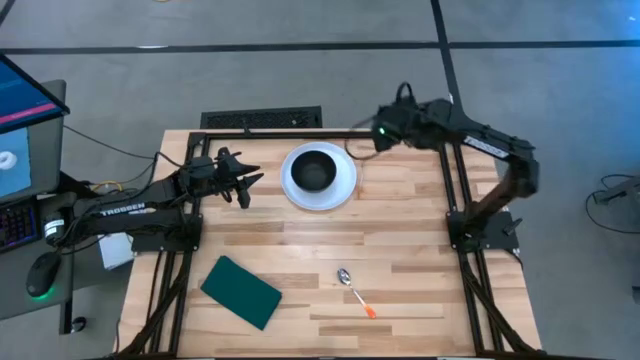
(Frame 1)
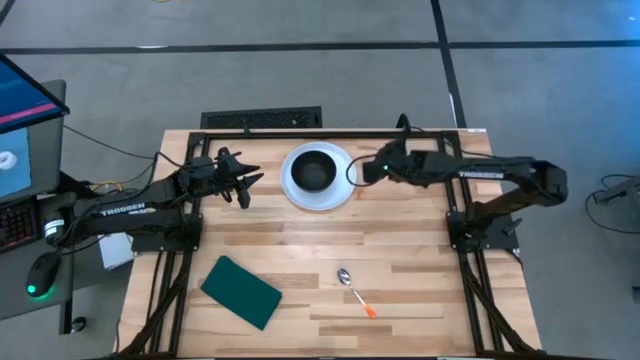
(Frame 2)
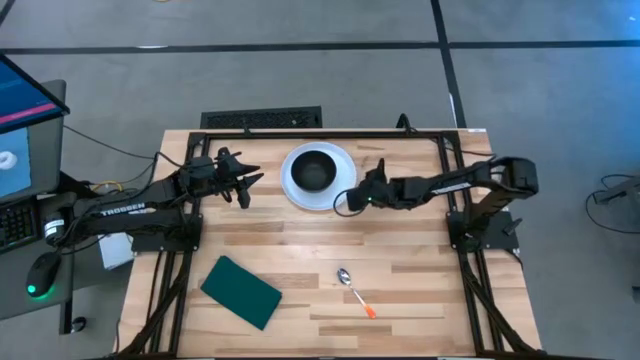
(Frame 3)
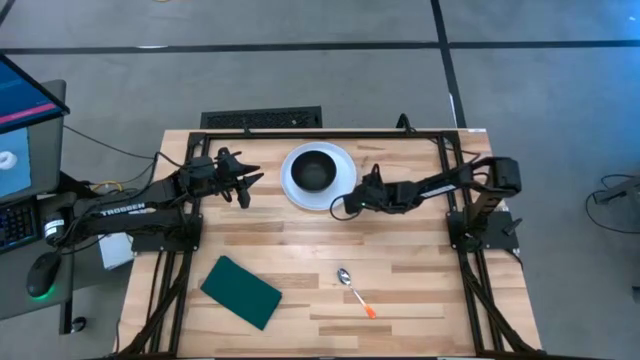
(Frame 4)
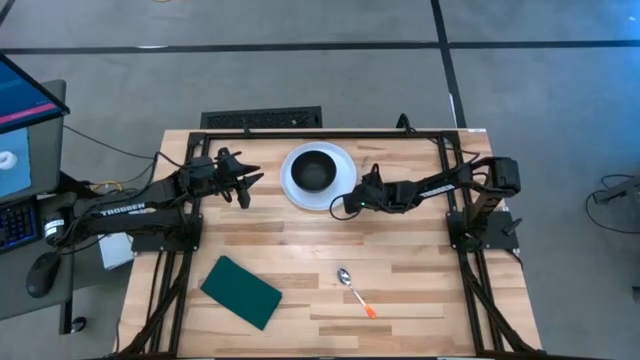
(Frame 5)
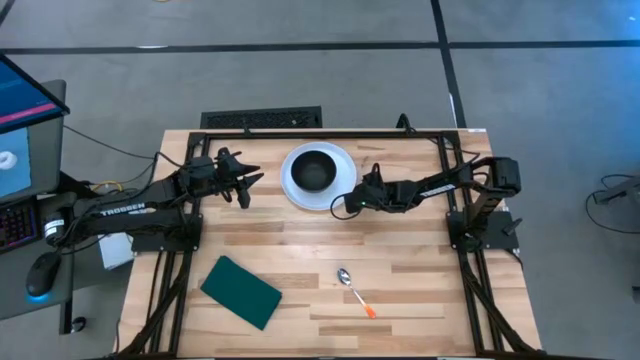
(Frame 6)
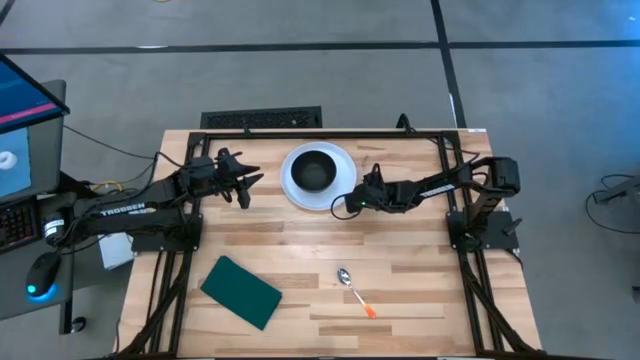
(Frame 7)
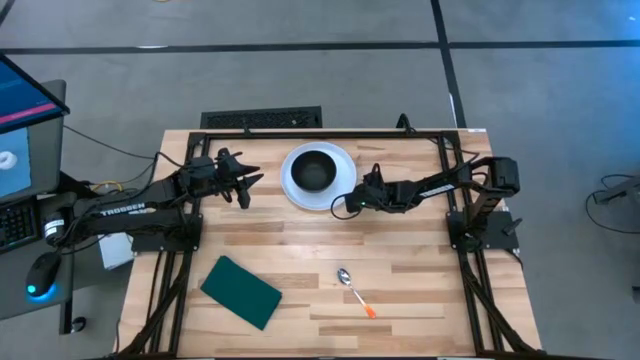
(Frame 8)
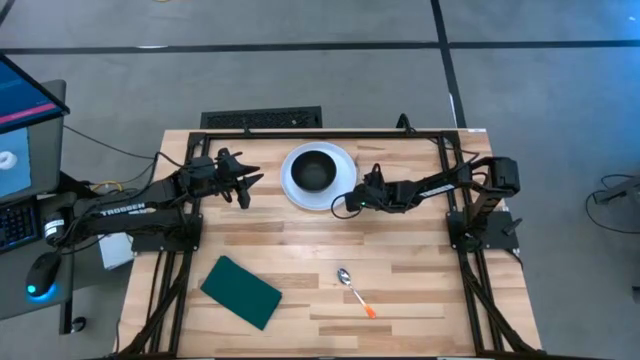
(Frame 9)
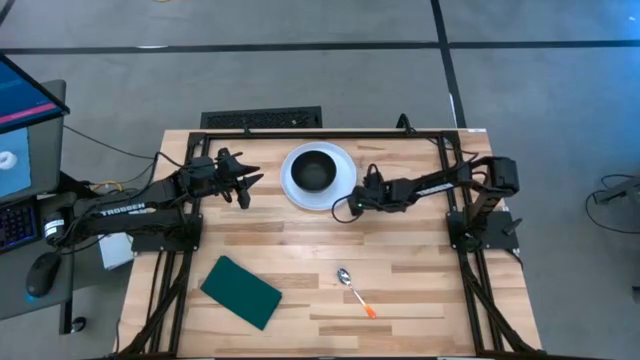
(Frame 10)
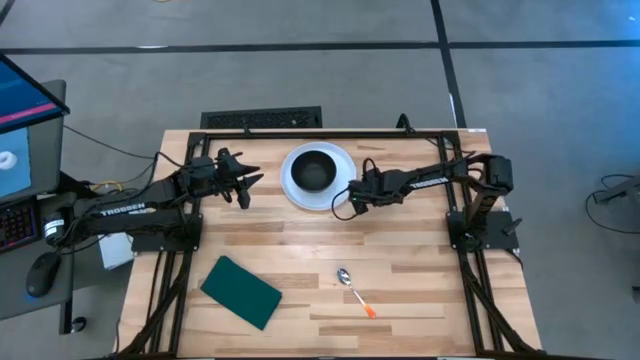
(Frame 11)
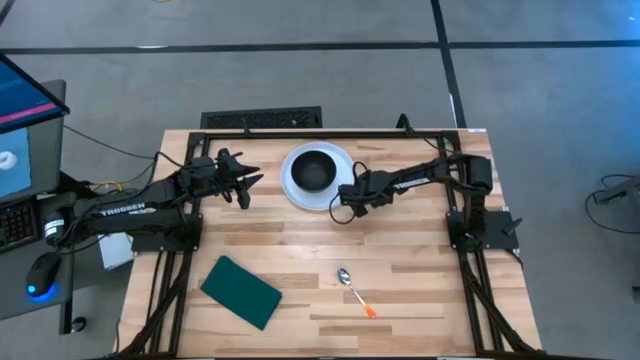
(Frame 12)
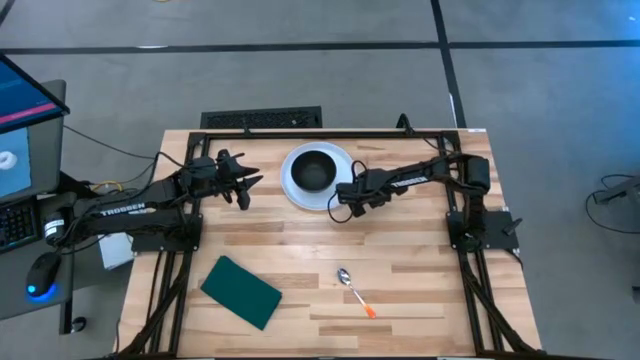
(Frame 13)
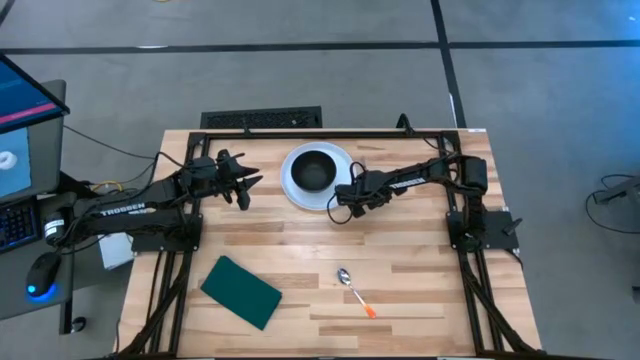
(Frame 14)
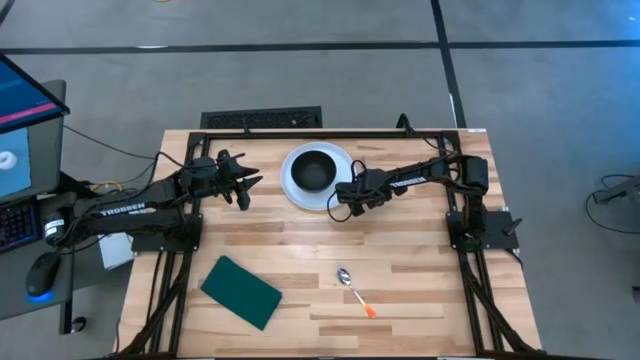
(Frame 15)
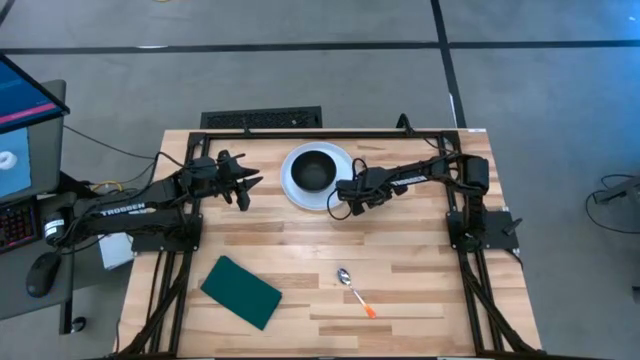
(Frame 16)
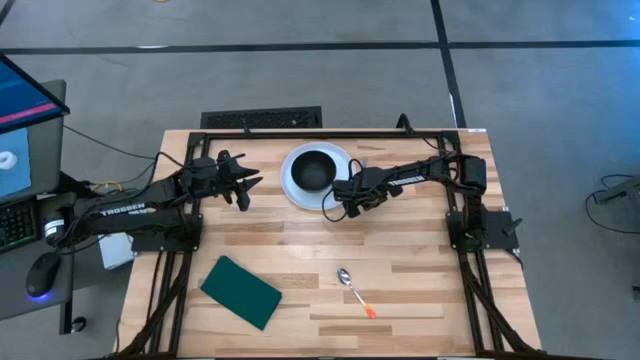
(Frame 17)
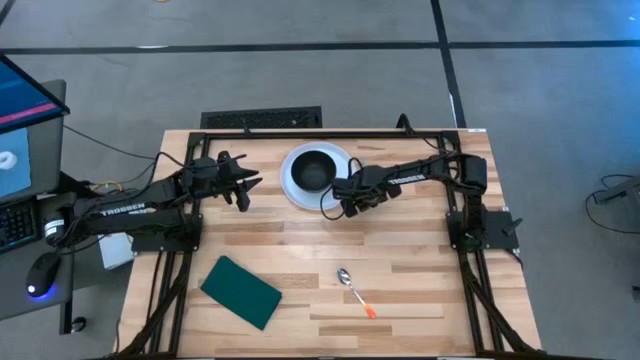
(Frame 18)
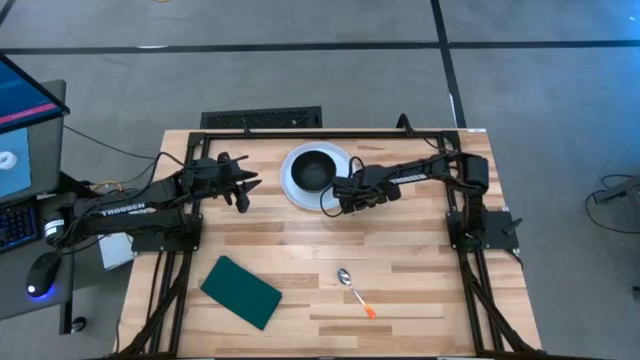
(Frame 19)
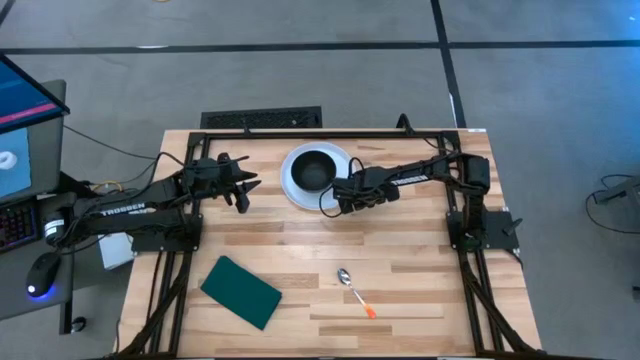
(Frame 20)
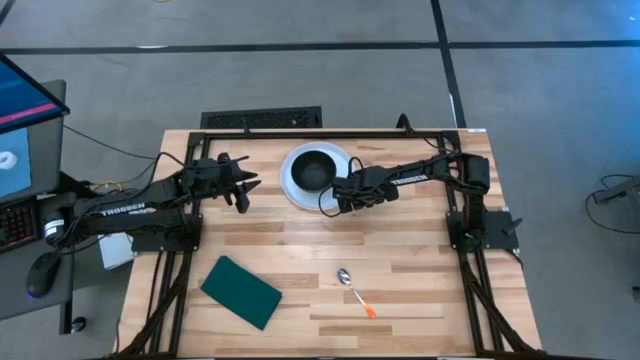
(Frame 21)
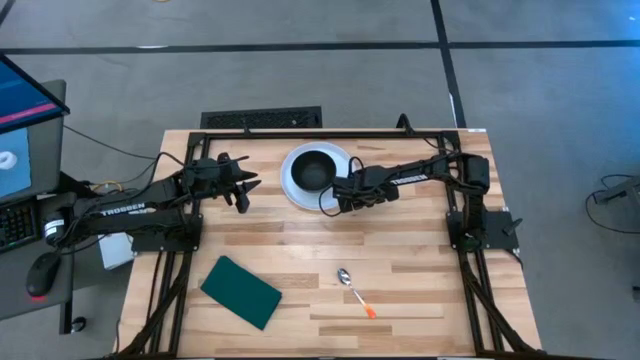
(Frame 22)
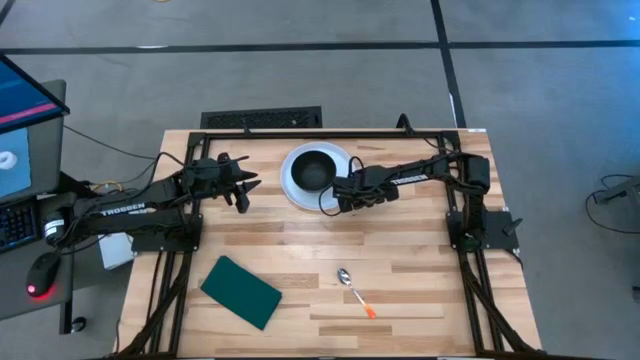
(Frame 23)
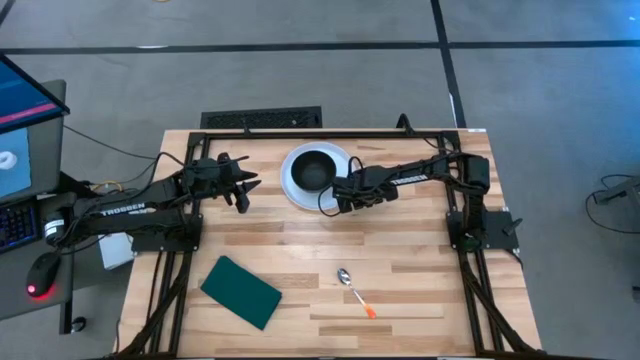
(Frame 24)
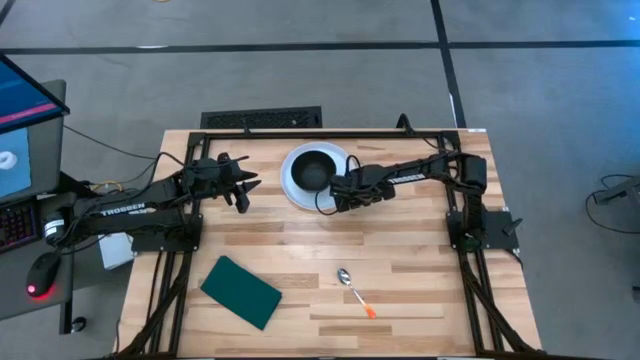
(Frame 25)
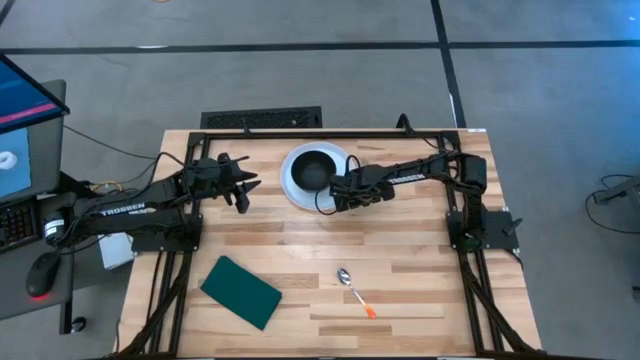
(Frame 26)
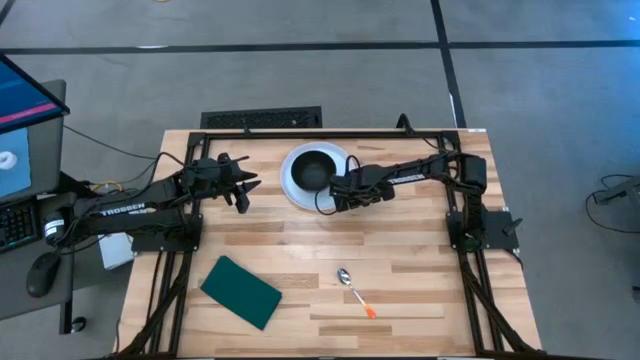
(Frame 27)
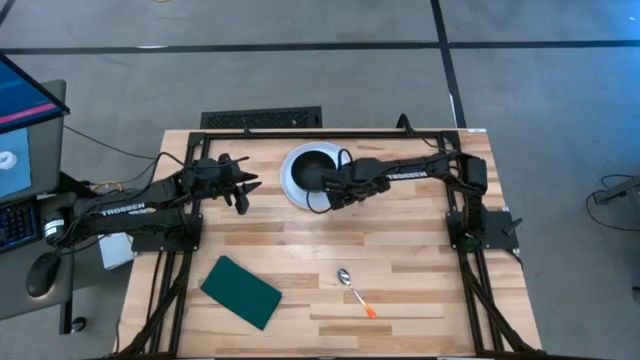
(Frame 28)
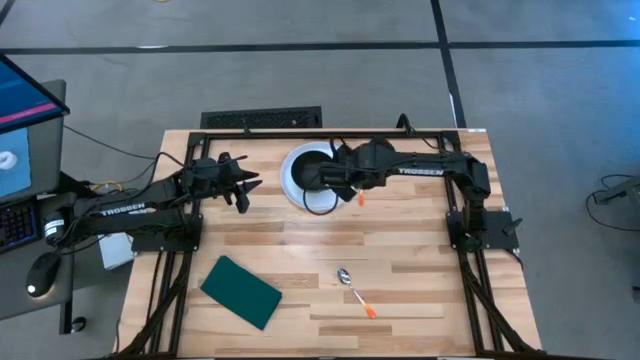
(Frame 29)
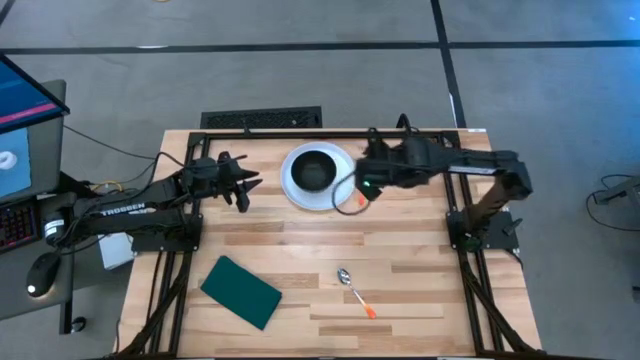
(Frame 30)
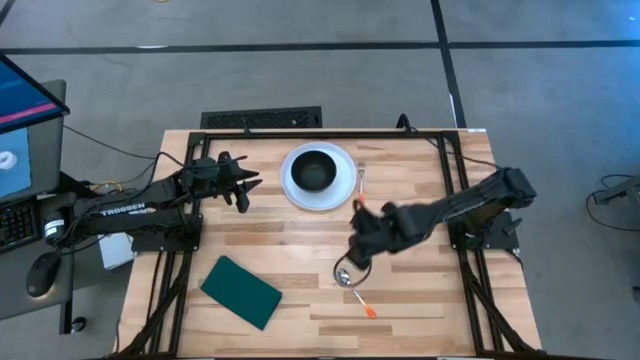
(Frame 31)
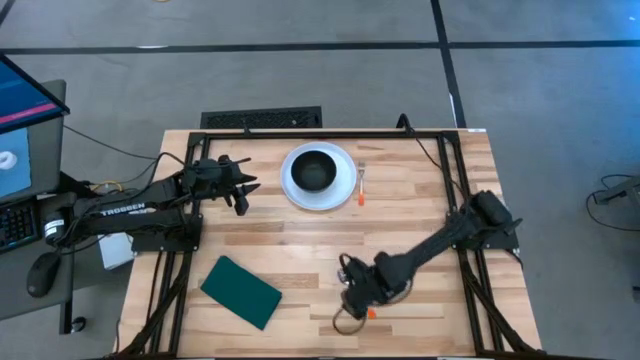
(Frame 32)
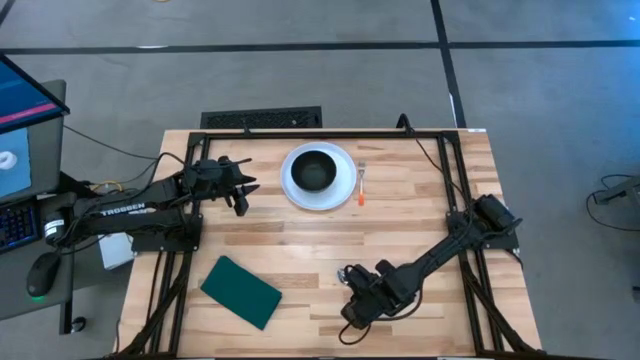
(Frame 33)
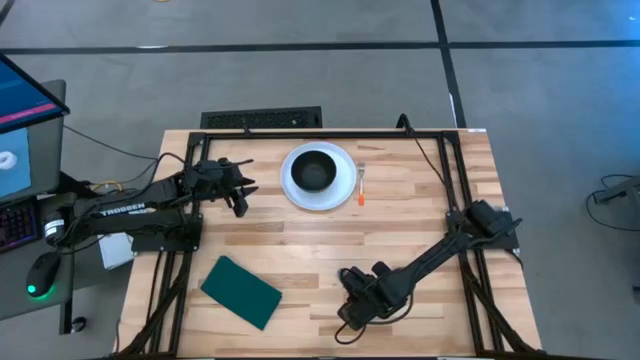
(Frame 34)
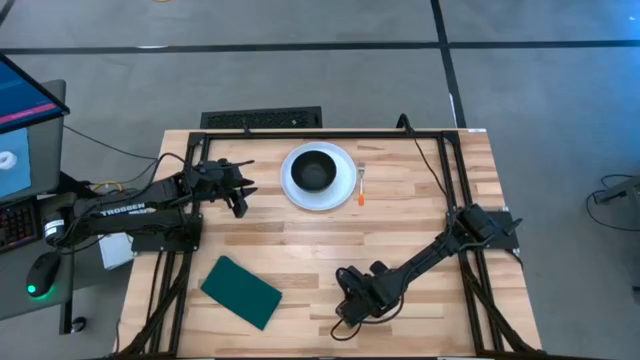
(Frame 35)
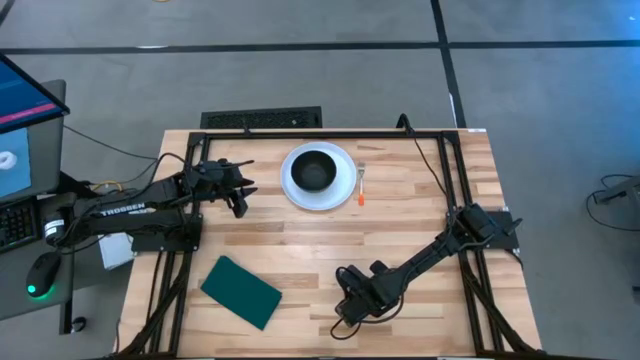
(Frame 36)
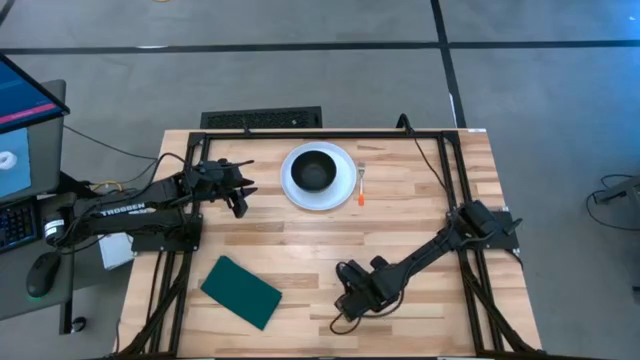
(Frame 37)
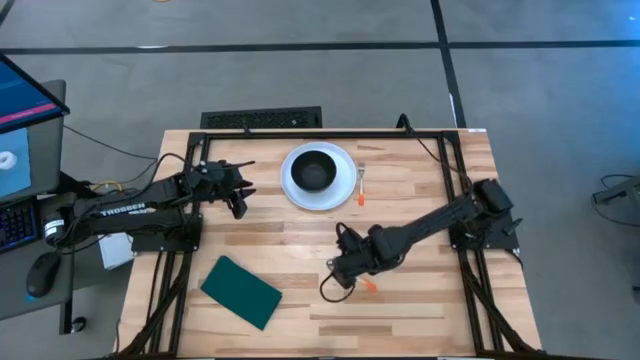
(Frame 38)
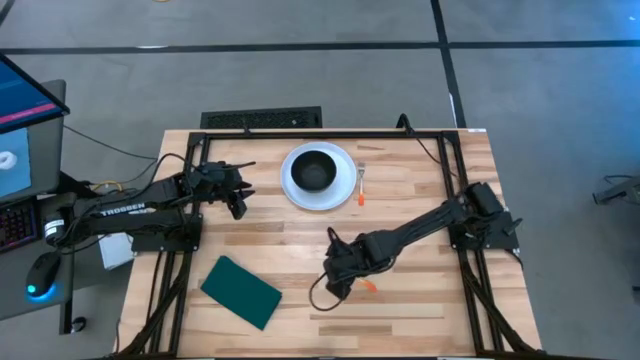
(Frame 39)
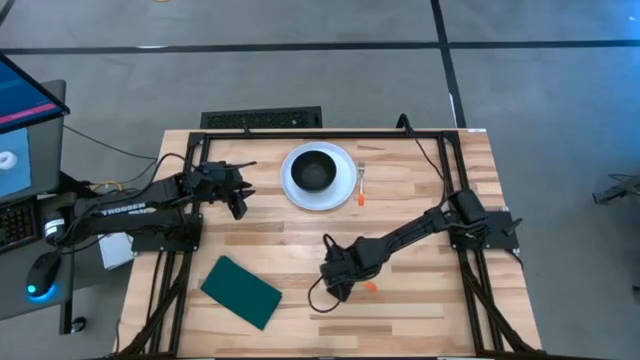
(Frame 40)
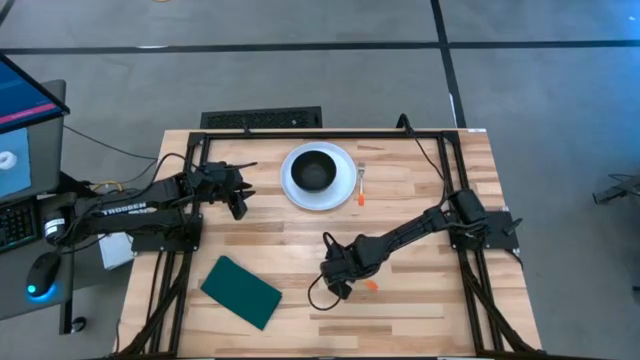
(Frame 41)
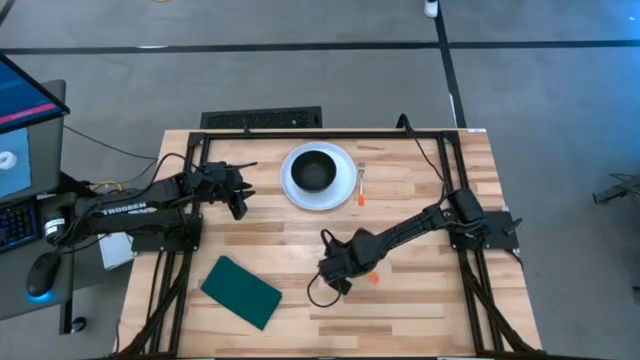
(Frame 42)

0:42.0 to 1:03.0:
Task: Set table place
Place the fork into the black bowl

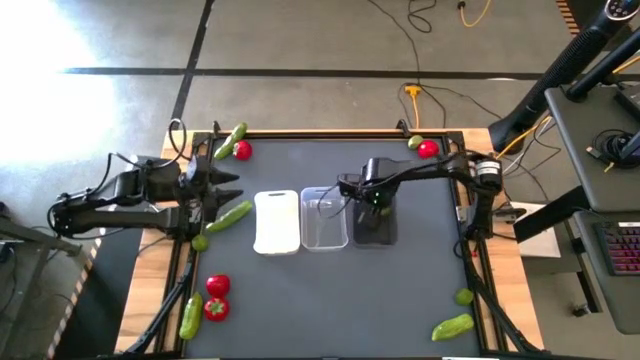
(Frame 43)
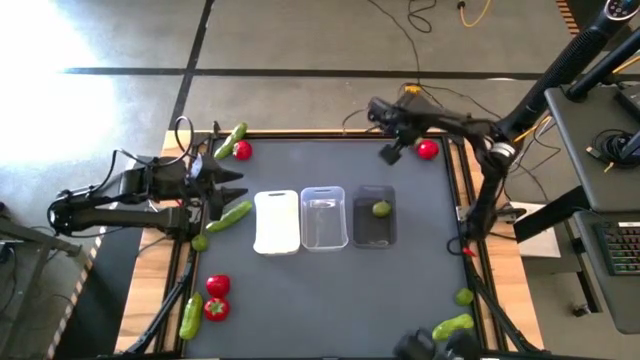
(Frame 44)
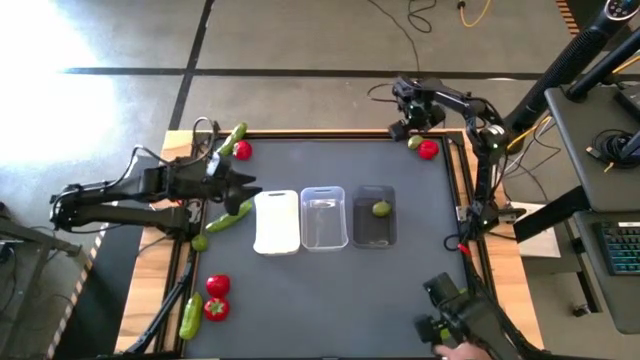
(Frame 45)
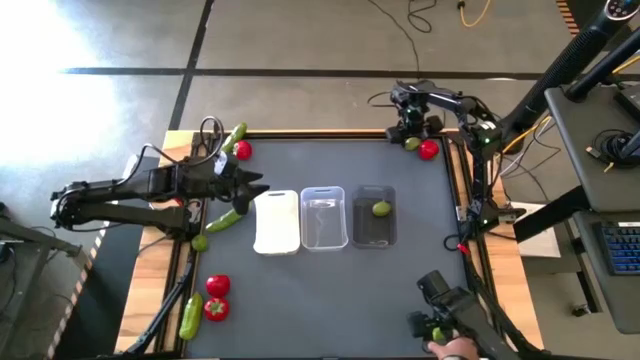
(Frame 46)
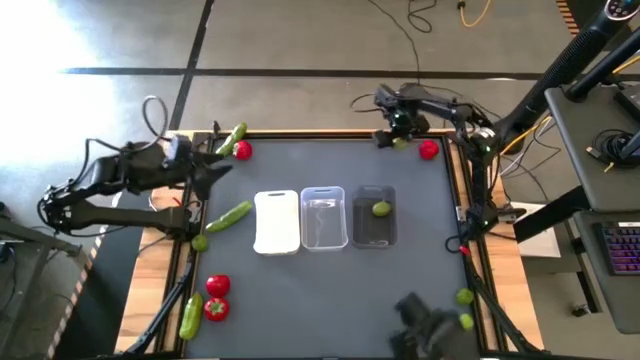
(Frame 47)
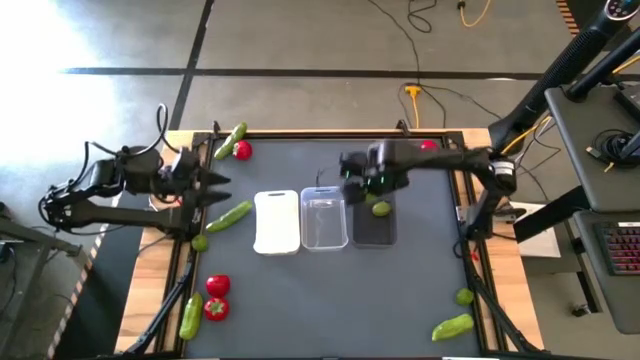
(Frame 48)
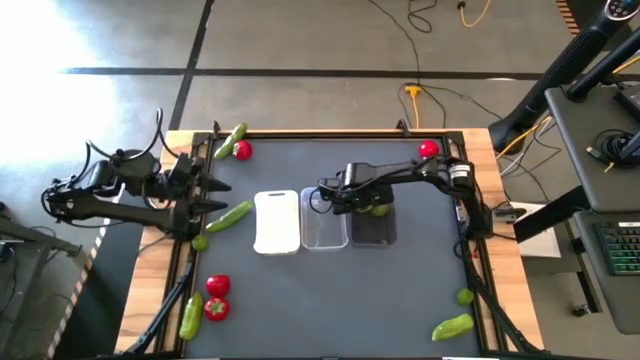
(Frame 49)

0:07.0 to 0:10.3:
Task: Sort produce into baskets
Put the green lime into the black bin
